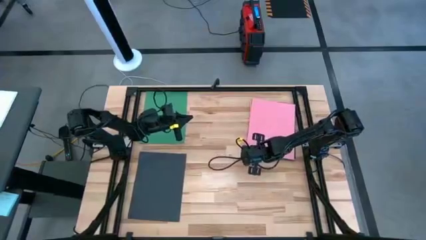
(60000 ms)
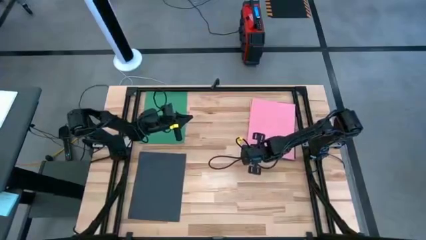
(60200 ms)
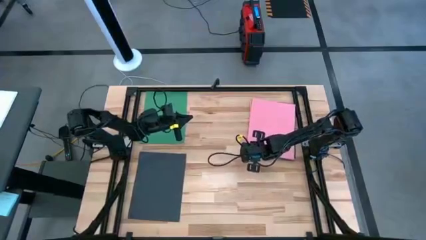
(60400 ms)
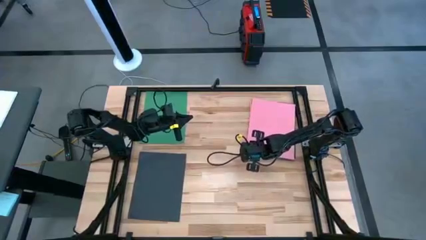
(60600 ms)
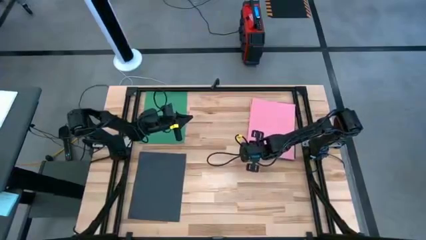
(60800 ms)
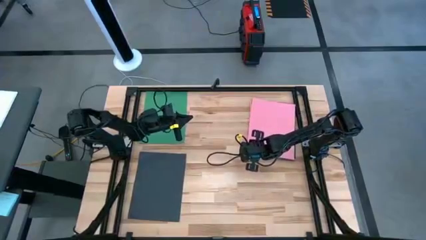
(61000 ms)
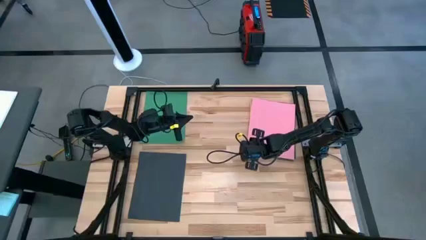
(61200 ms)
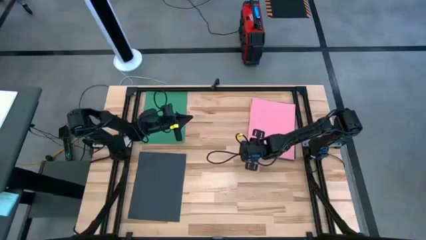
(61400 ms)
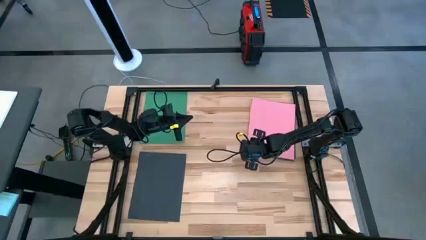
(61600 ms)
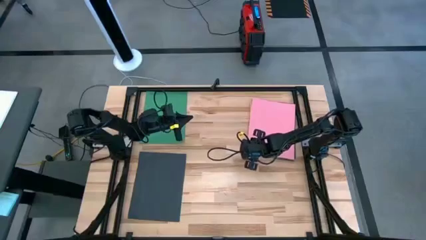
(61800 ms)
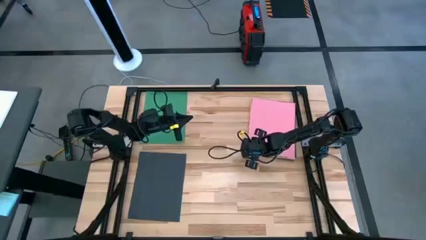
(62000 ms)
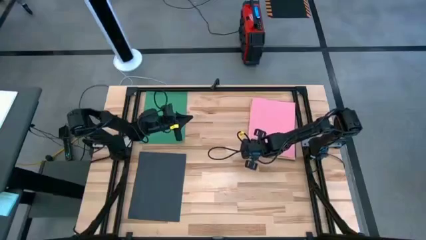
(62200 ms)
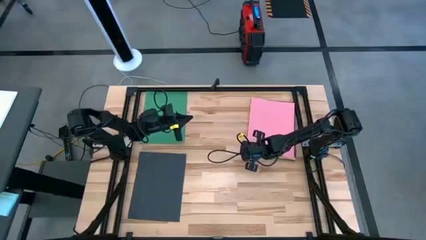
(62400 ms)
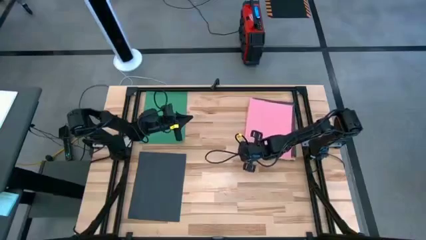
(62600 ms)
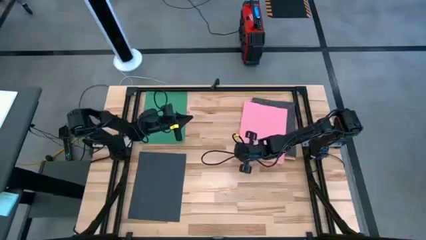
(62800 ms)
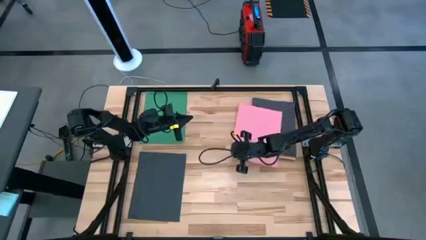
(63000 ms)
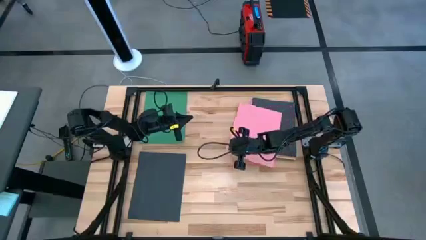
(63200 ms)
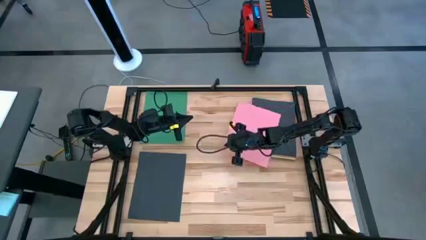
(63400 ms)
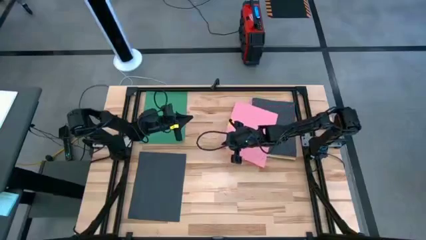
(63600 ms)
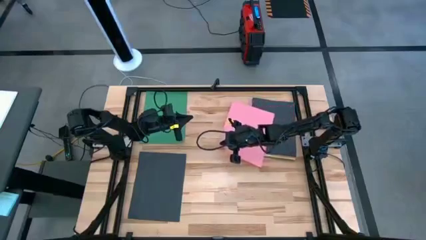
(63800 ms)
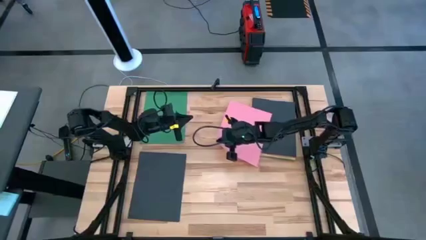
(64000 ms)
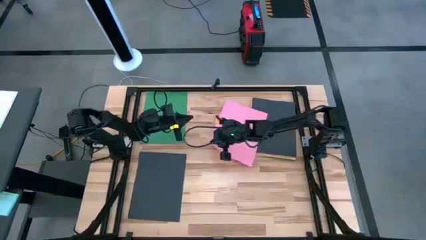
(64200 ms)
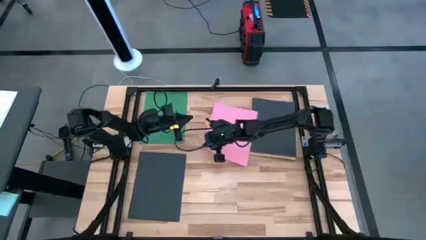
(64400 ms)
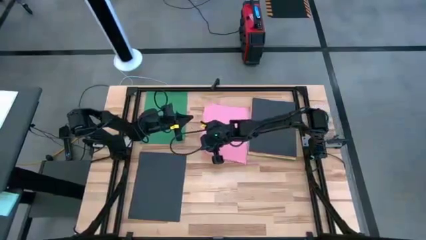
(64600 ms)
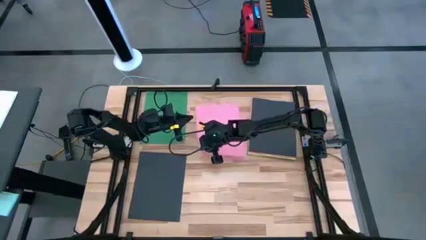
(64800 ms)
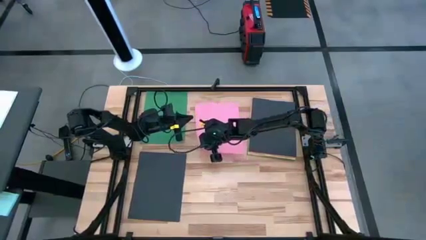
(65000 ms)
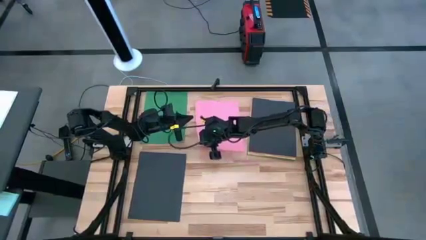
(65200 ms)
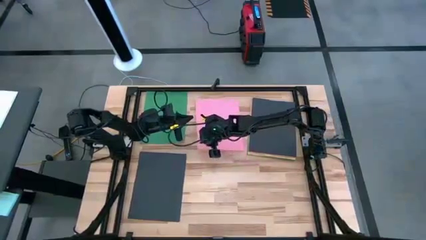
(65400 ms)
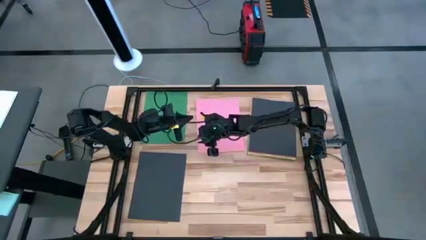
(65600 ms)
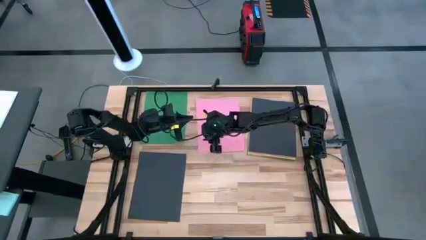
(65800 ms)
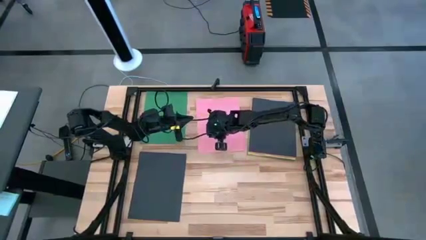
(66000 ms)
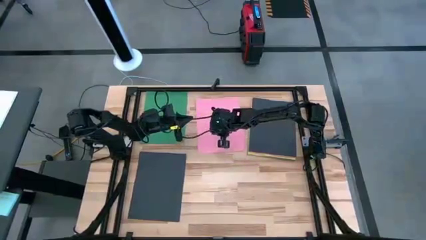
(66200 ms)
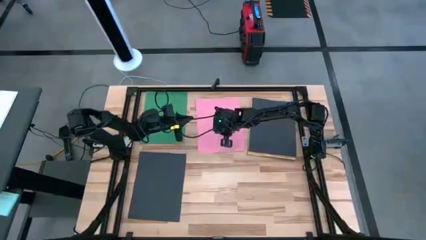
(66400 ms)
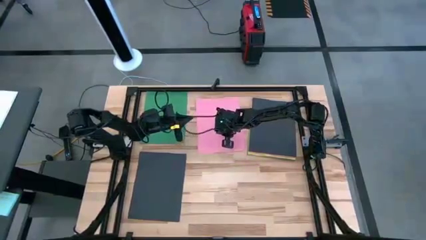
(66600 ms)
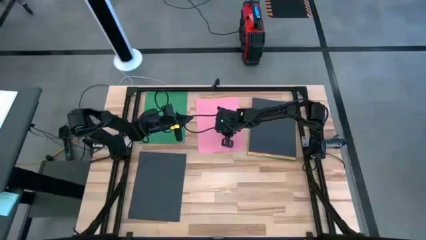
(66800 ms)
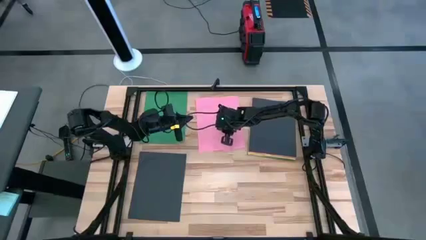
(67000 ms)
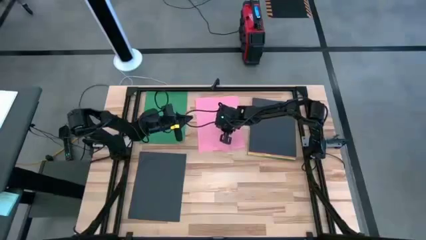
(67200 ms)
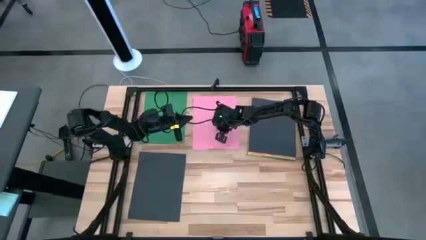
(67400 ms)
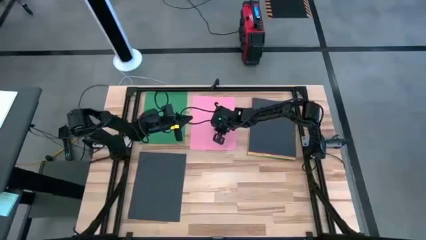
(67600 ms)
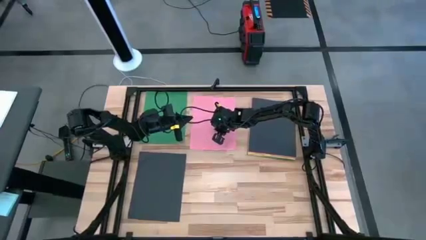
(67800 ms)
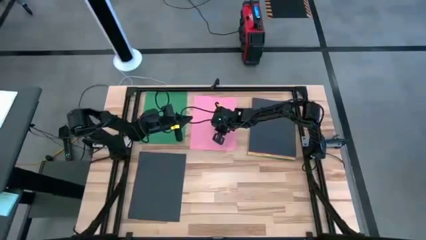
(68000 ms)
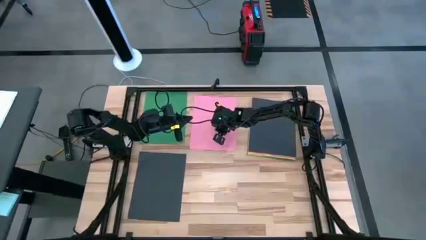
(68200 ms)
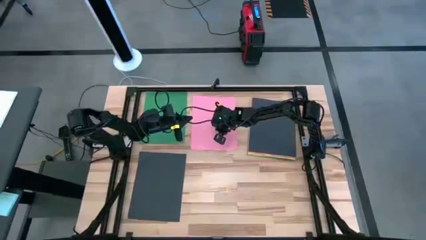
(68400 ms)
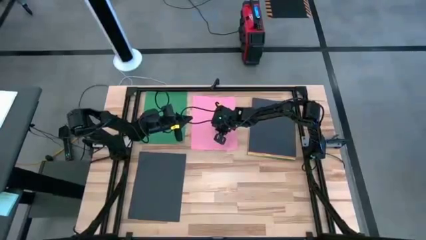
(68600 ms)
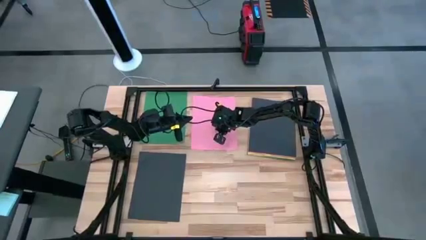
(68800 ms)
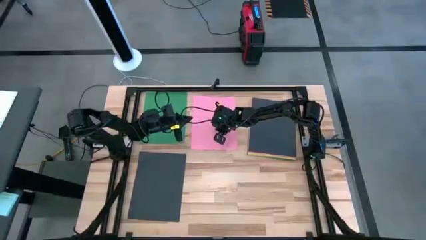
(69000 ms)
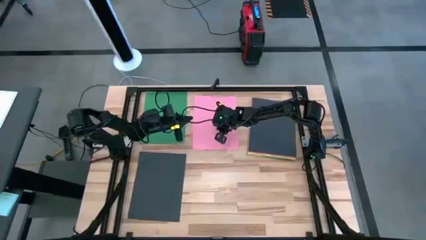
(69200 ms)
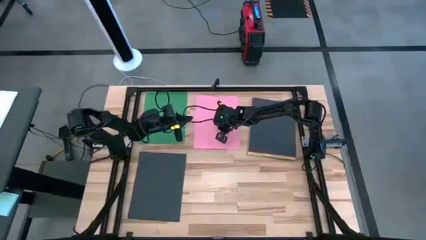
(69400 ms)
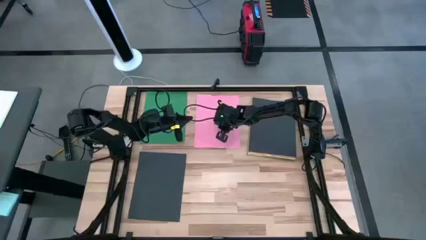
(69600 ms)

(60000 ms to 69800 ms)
Task: Organize paper
Move the pink paper to the top center of the table

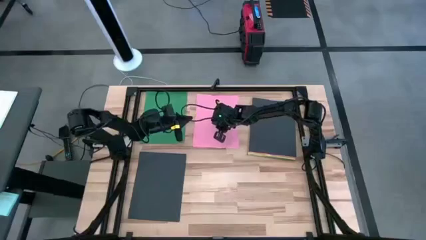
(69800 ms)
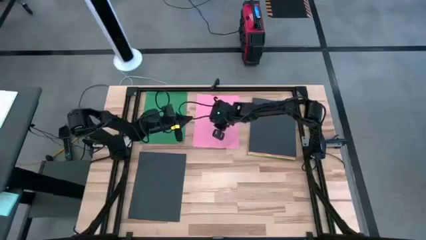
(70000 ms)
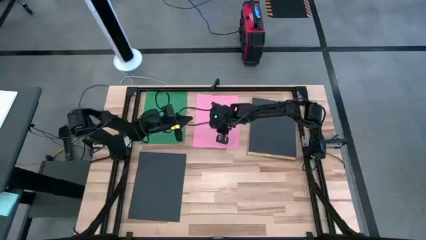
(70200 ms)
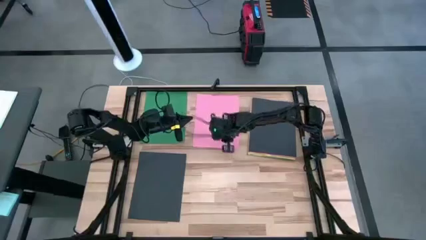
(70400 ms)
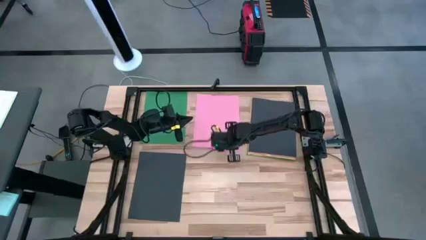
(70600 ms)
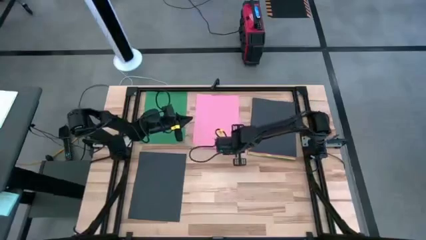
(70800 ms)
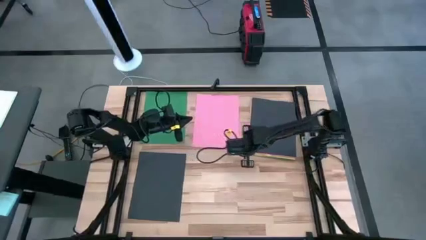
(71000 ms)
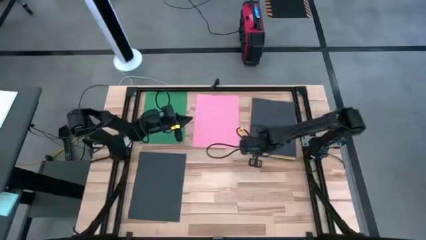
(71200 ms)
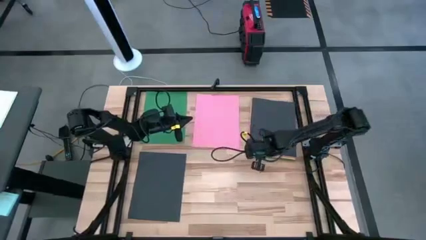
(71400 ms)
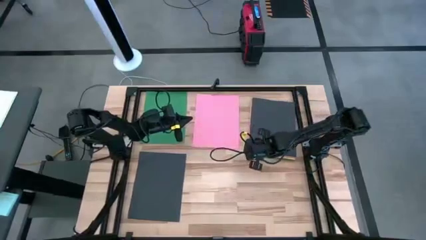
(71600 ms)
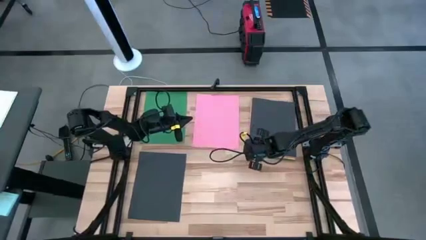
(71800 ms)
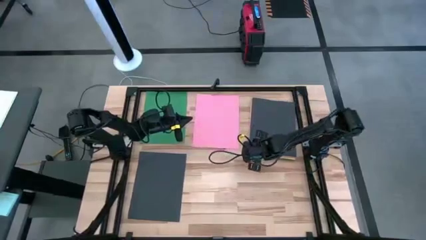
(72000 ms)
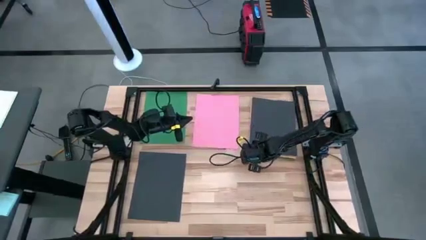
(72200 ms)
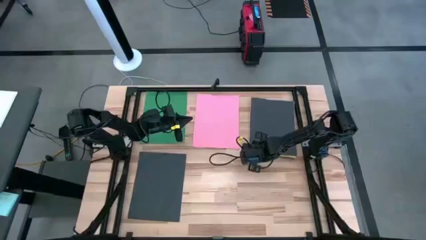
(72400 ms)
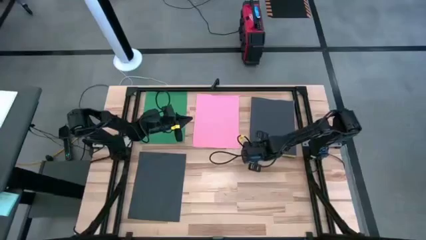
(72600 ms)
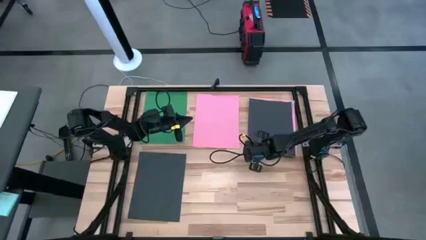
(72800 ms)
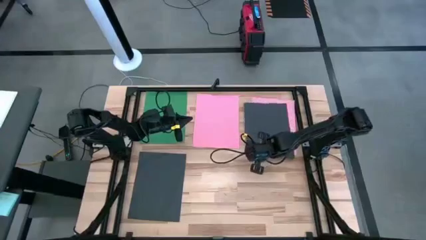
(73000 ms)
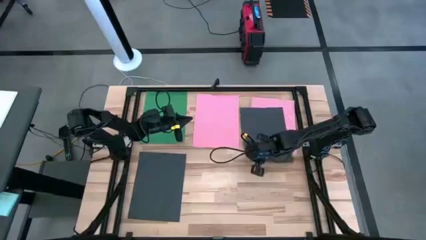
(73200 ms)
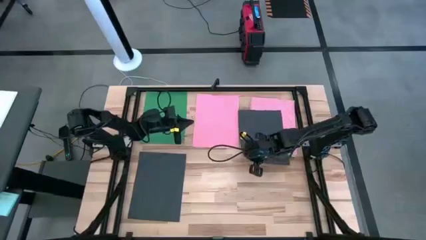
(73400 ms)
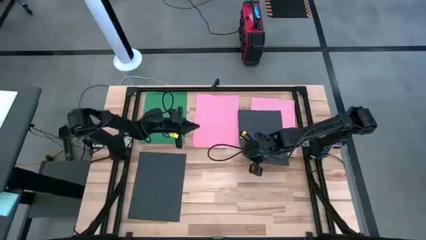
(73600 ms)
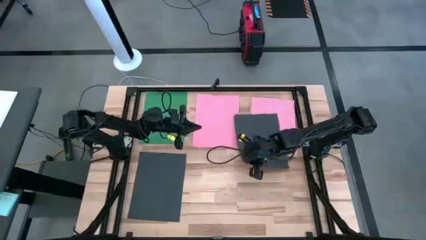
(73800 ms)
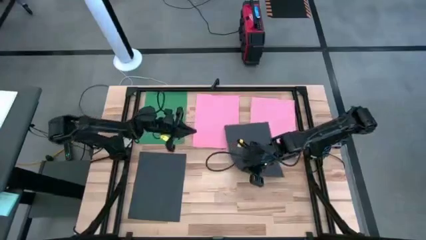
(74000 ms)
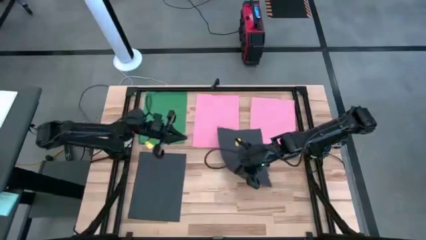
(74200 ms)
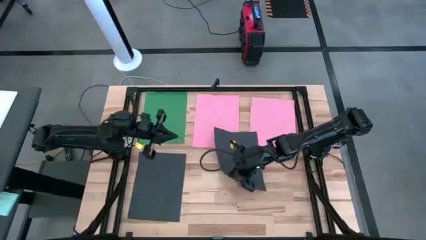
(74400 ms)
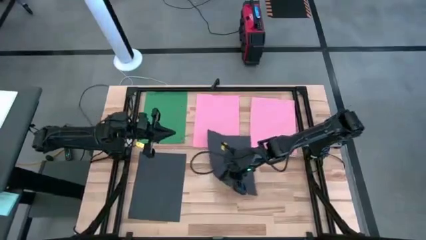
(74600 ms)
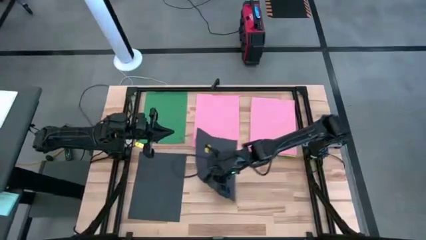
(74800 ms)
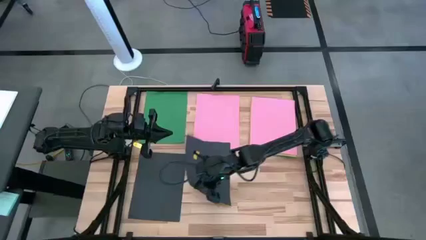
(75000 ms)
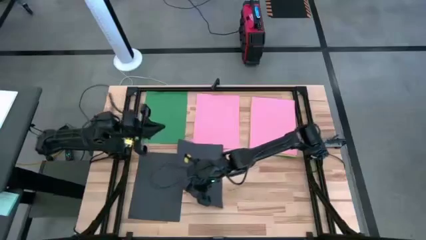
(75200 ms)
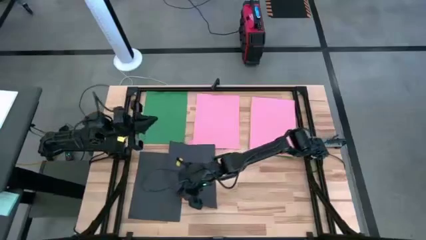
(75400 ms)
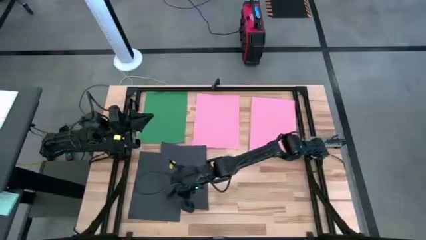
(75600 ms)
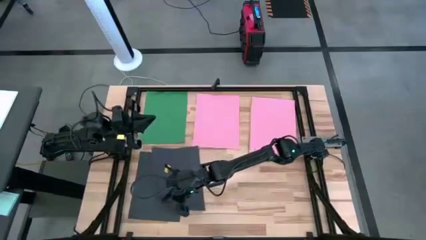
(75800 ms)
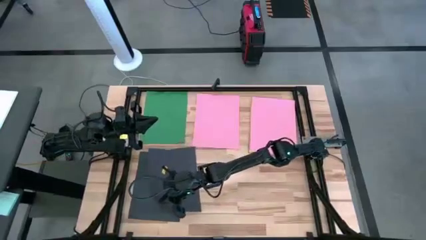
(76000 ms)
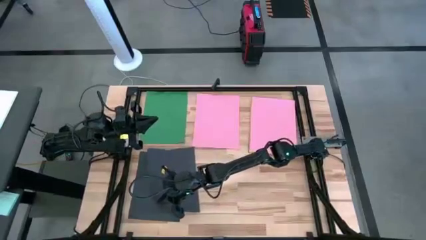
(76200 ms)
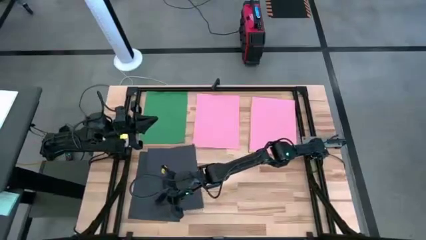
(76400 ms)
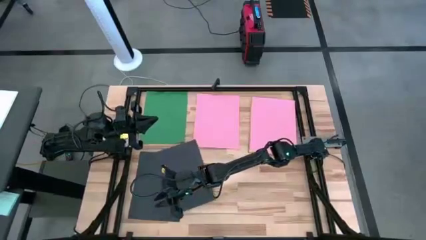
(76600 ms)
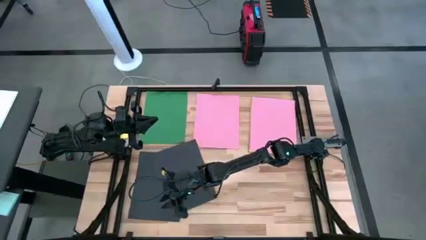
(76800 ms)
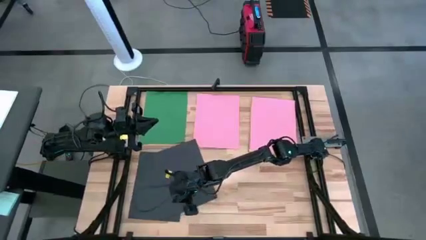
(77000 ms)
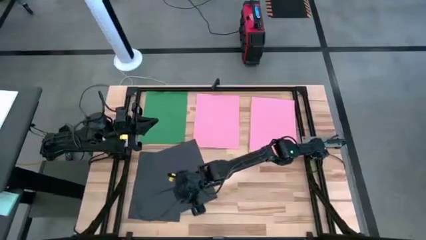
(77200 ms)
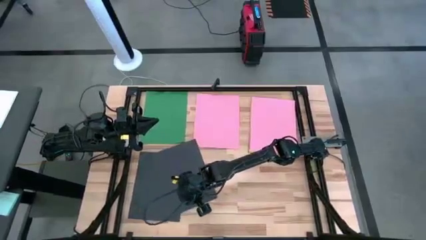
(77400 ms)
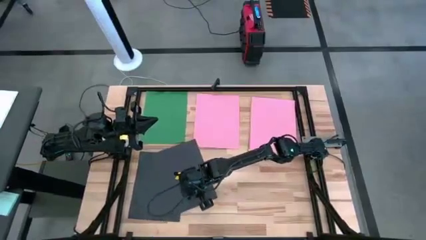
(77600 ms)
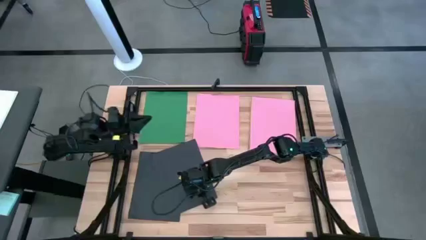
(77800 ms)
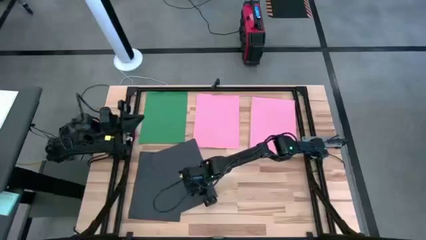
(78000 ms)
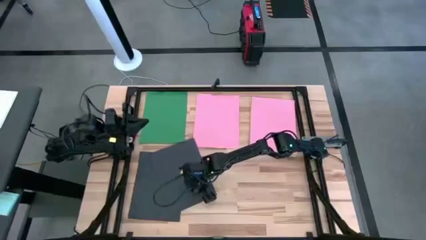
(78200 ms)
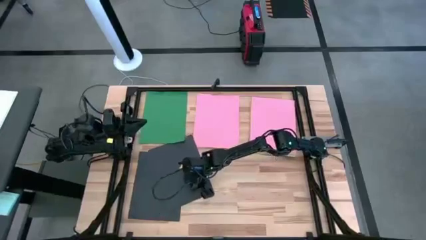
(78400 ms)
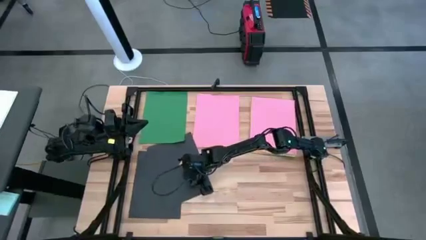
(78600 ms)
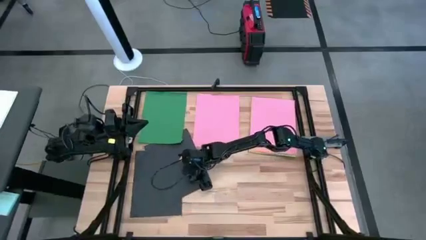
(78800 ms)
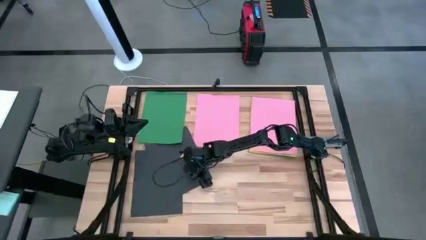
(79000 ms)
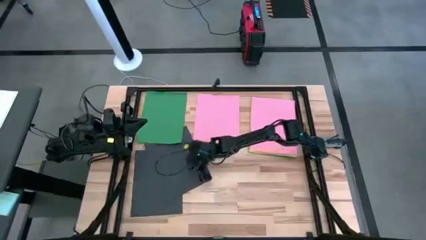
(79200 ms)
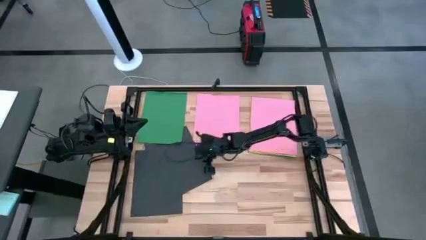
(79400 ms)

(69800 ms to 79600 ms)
Stack the black paper on top of the black paper
